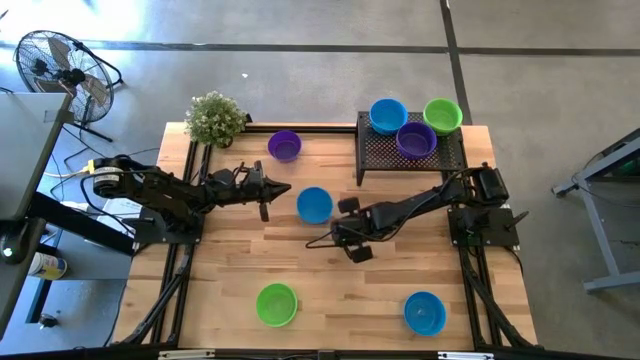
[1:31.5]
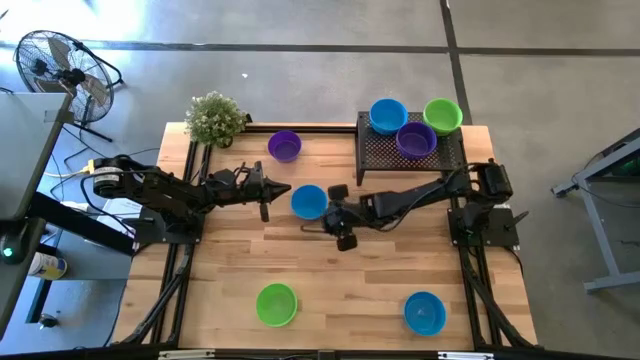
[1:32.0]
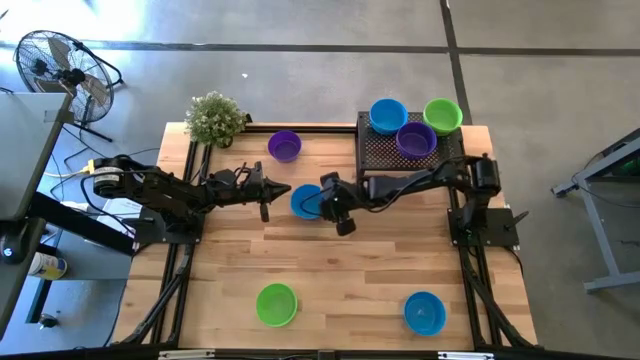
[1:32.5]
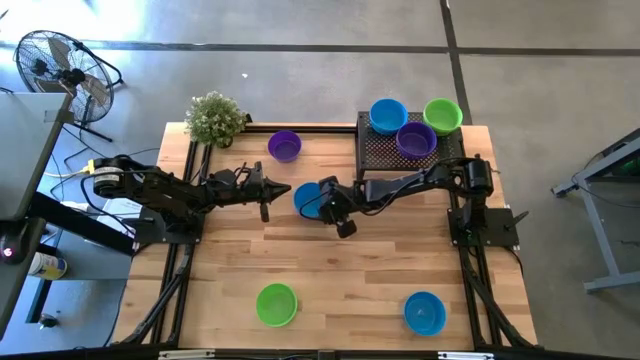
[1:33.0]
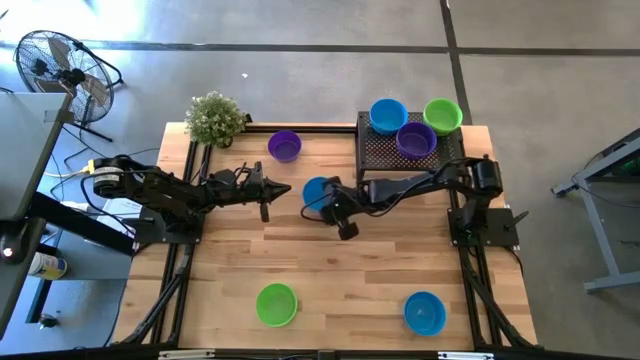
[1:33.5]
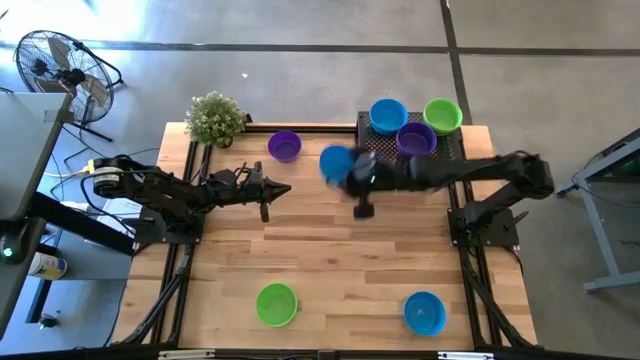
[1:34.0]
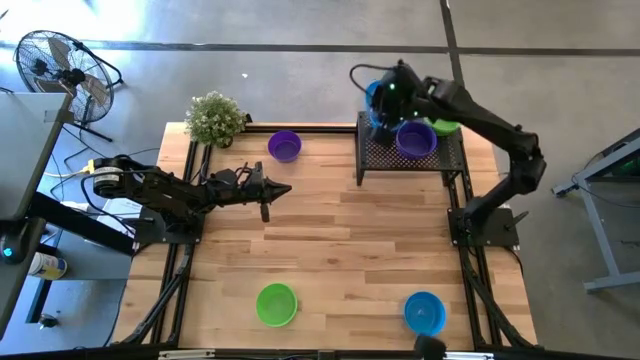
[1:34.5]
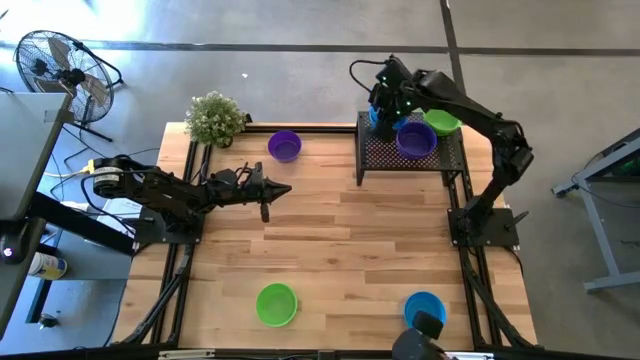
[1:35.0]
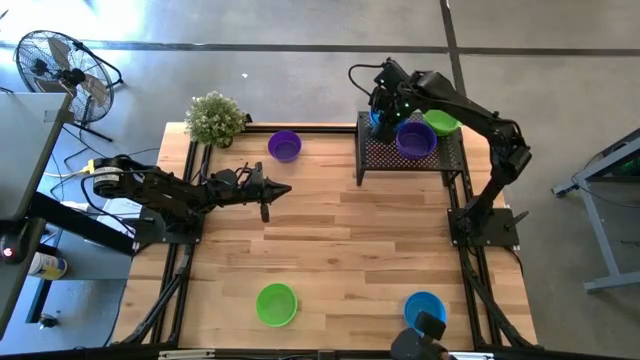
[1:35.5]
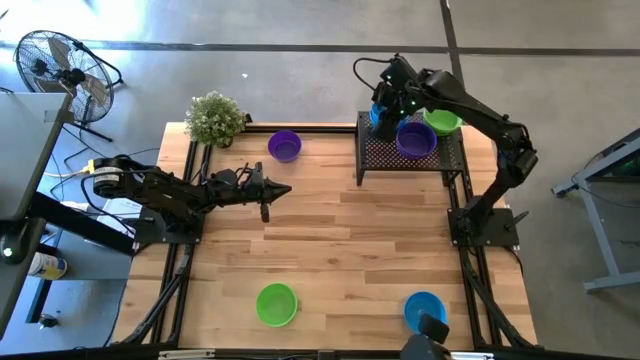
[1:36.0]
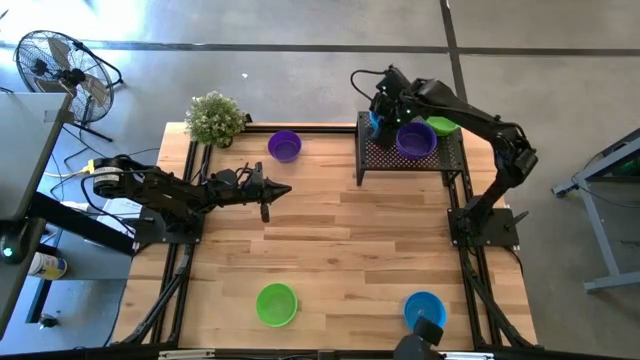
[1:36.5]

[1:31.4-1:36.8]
Task: Pick & Place Mini bowls
Stack the blue bowl on top of the blue bowls on the shelf

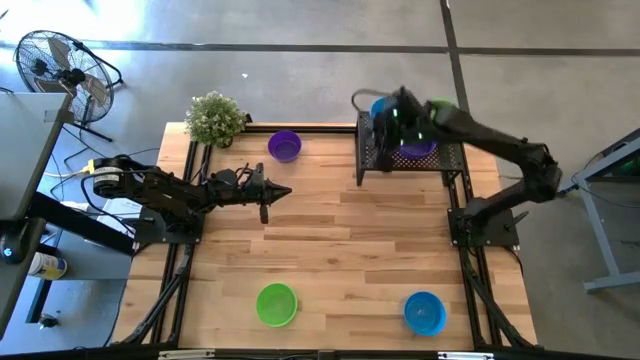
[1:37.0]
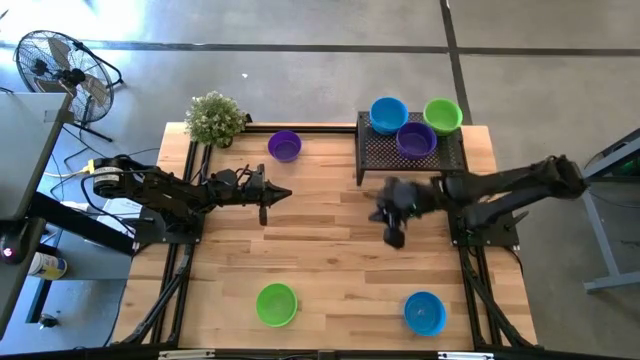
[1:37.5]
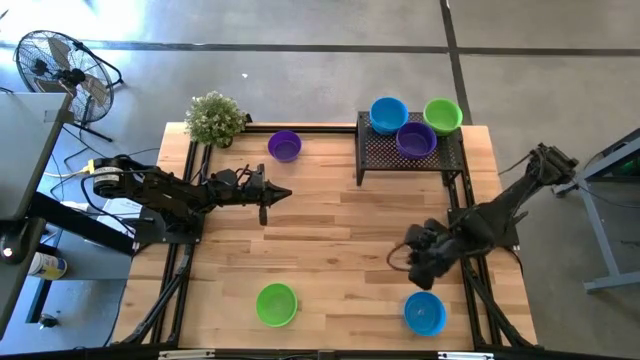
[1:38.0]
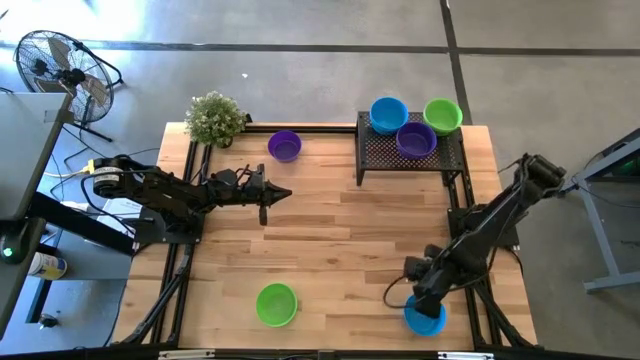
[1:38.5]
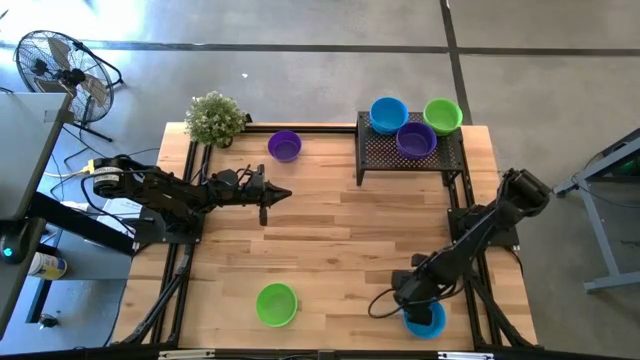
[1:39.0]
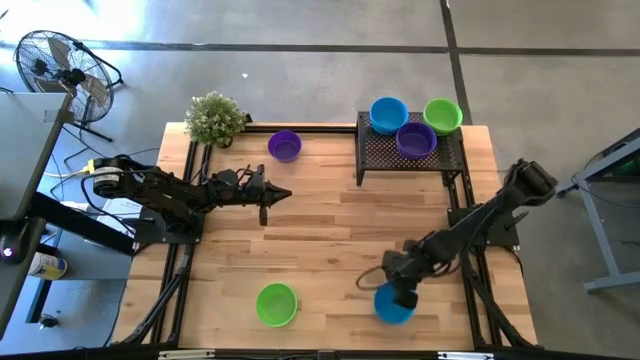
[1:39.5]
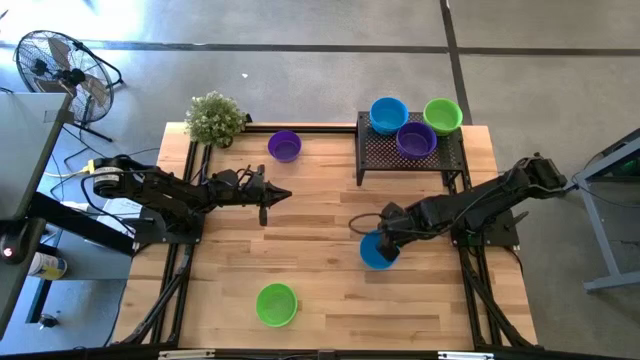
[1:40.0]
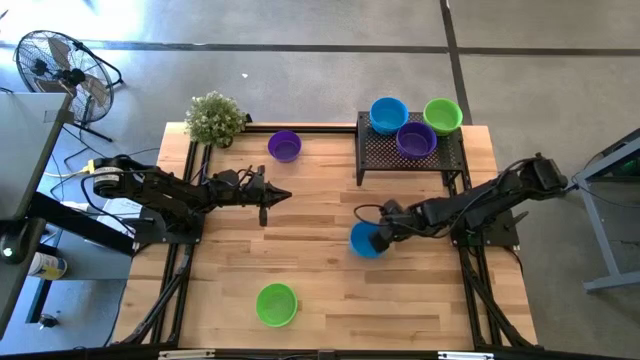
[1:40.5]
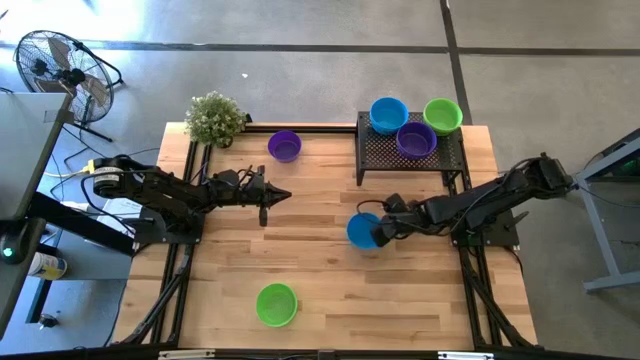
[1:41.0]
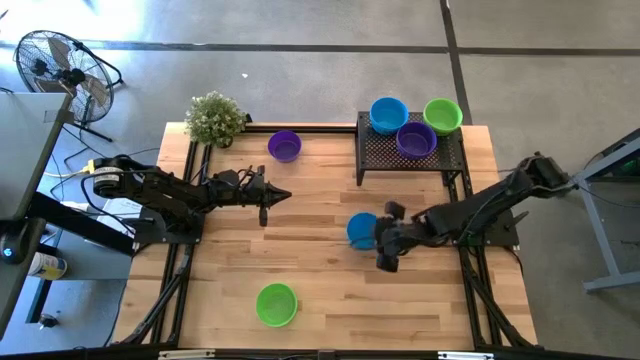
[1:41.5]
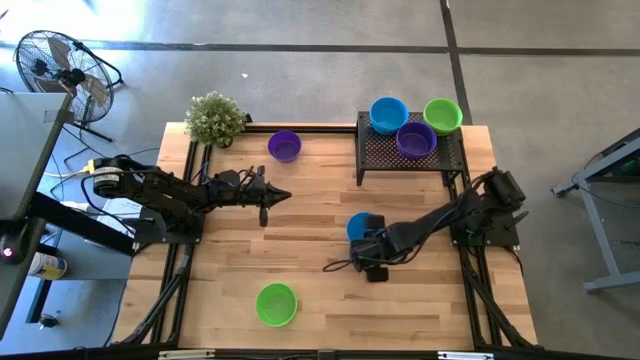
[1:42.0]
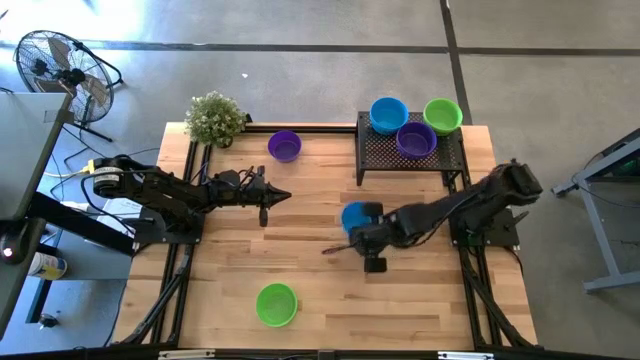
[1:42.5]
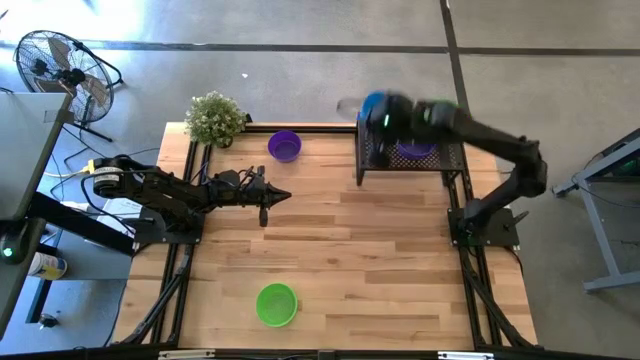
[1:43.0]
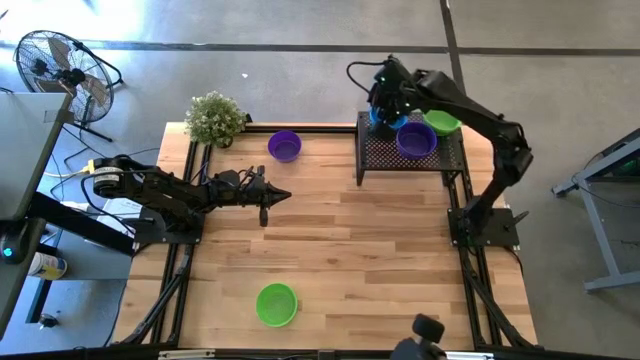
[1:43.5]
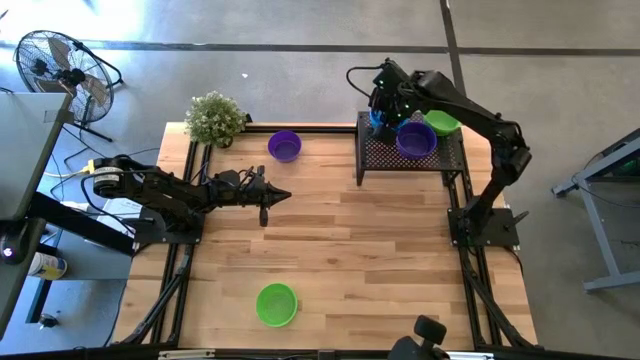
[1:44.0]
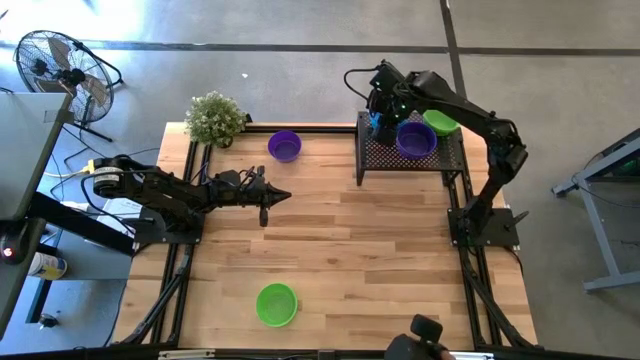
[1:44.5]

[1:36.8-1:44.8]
Stack the blue bowl on top of the blue bowls on the shelf

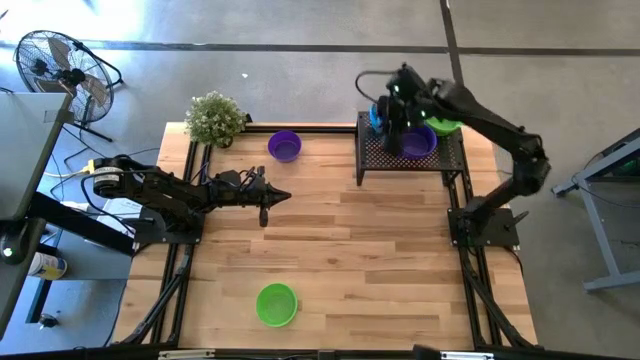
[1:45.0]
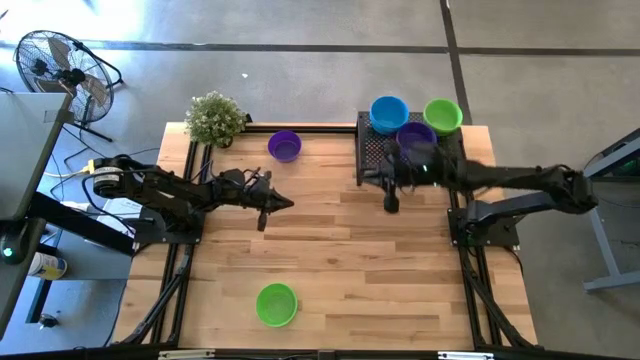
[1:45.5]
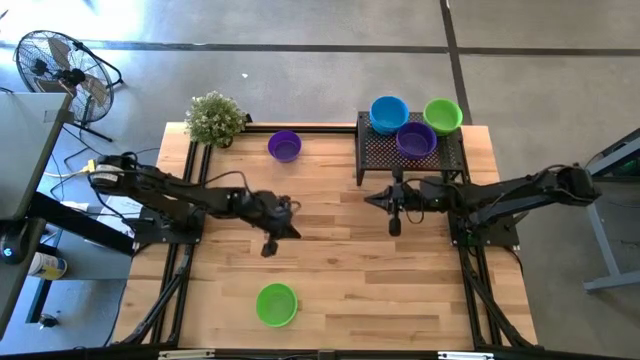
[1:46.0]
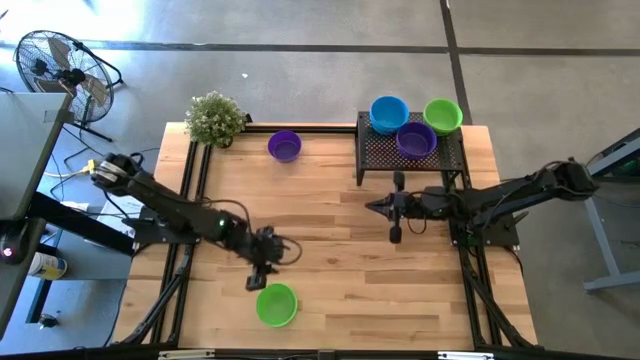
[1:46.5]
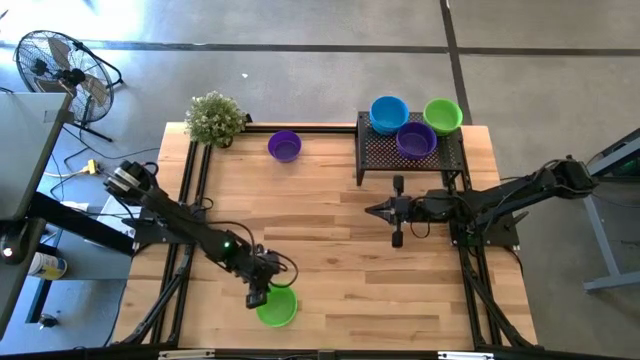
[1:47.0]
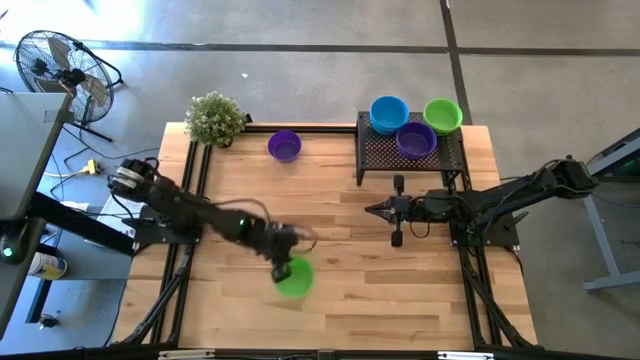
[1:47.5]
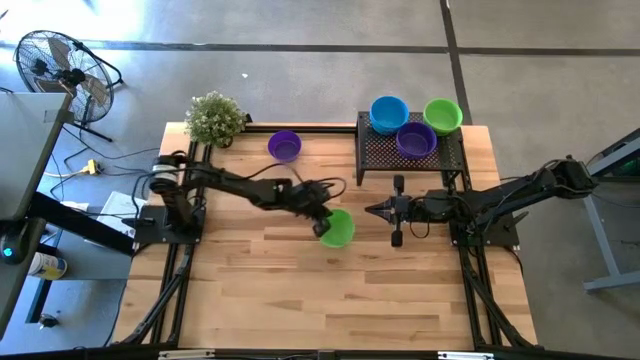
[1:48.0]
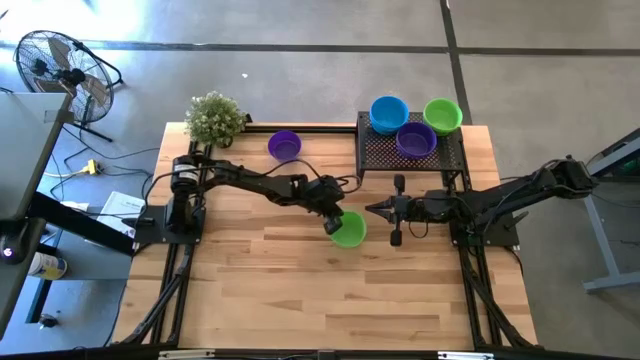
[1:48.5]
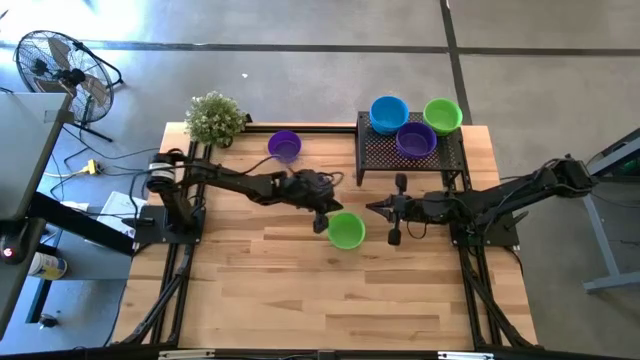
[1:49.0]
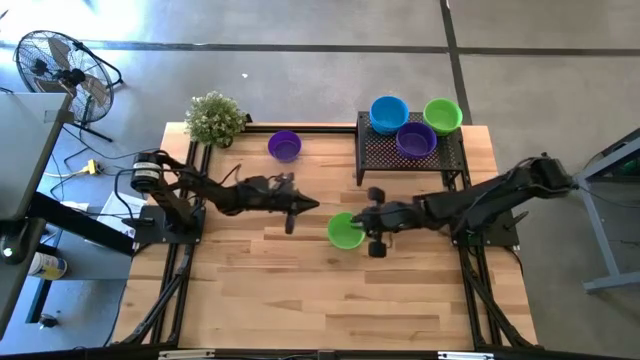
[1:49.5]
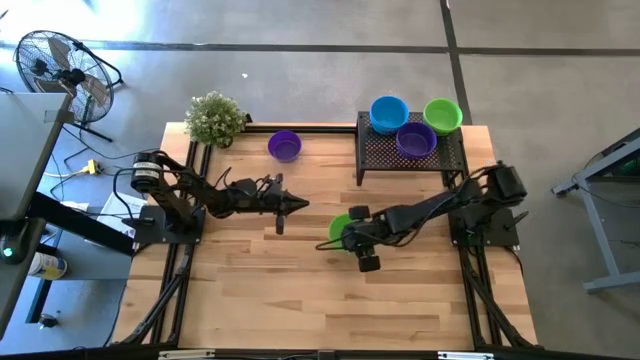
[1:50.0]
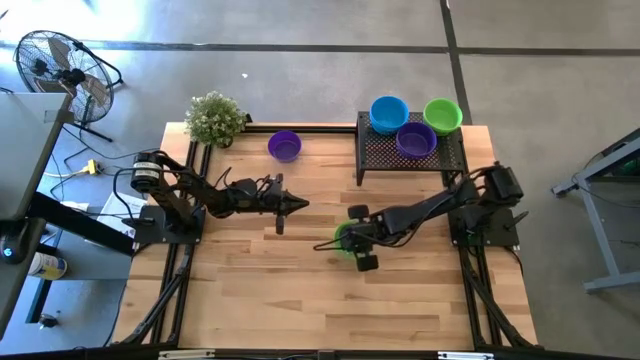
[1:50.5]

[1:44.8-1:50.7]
Stack the green bowl on top of the green bowls on the shelf

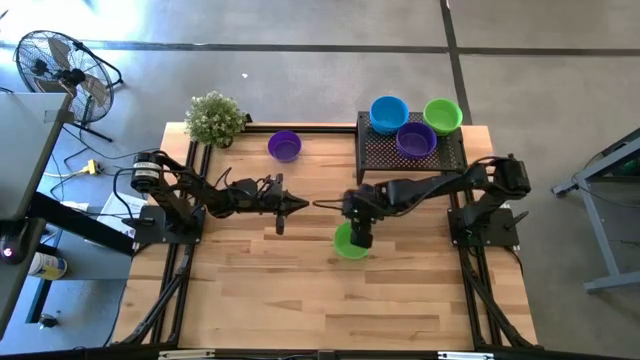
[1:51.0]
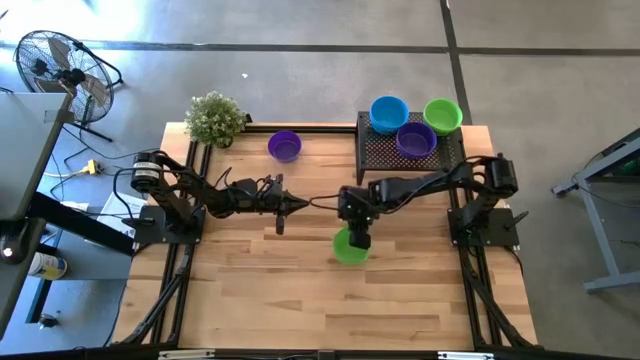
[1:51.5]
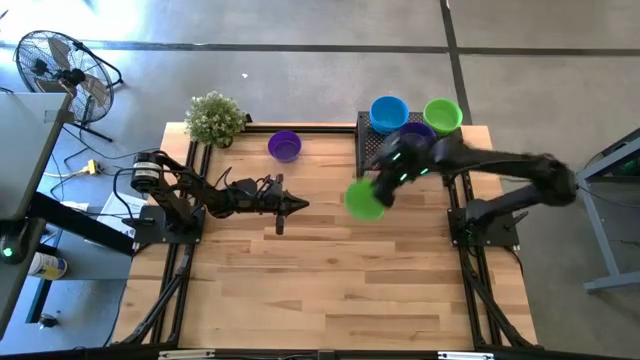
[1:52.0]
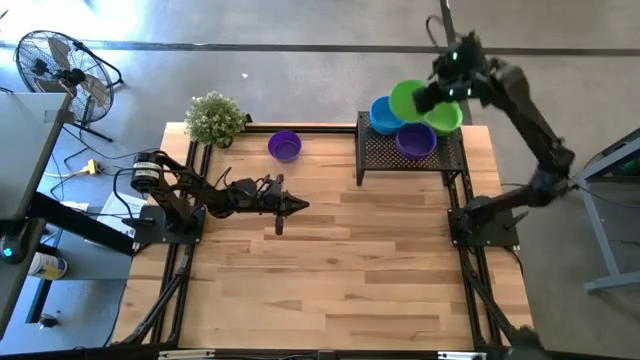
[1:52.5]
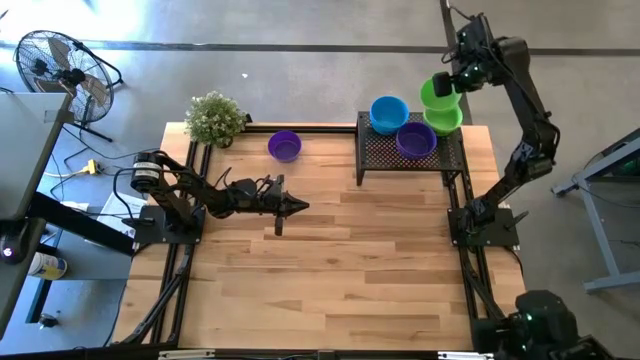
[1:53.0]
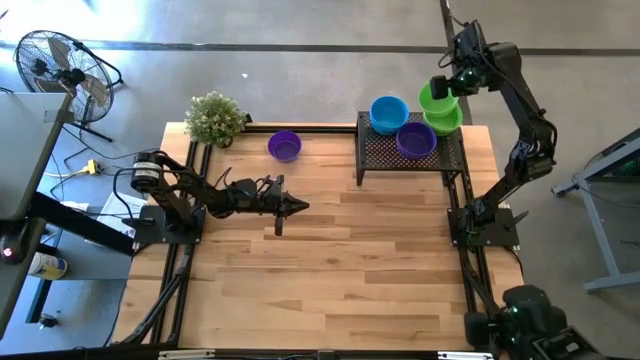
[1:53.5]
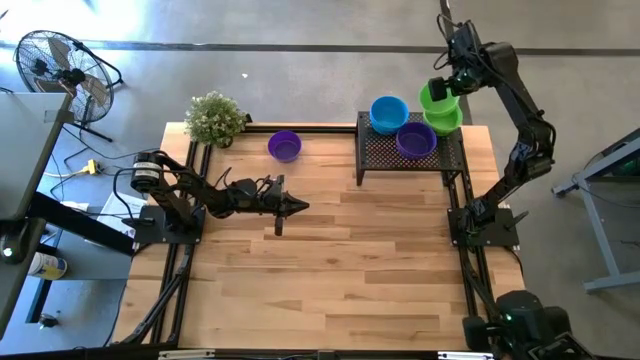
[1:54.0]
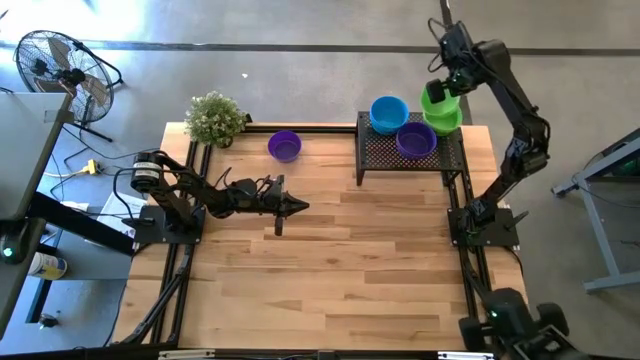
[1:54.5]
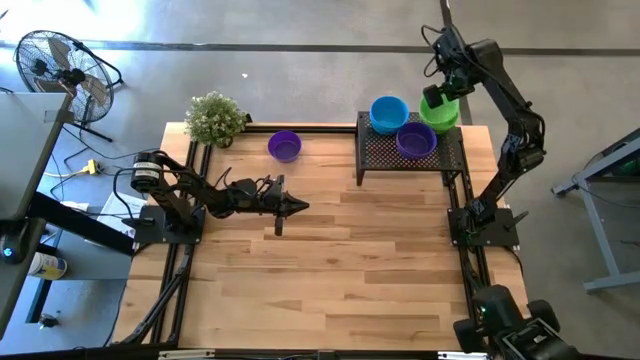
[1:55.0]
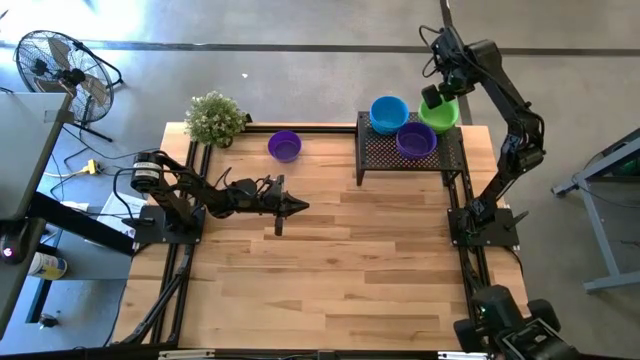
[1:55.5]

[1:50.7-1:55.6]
Stack the green bowl on top of the green bowls on the shelf
